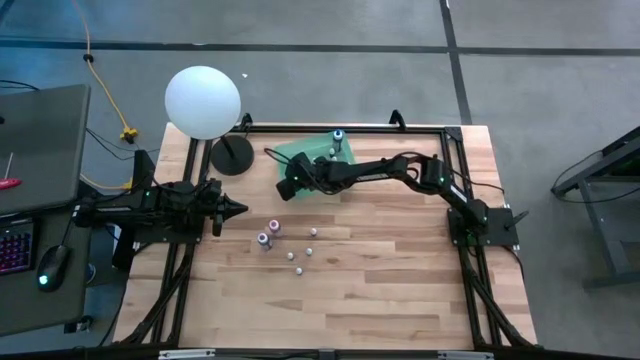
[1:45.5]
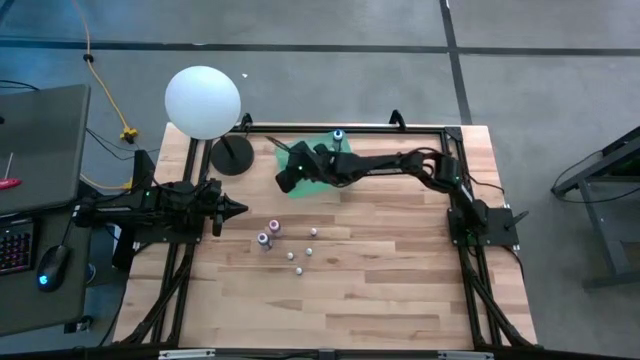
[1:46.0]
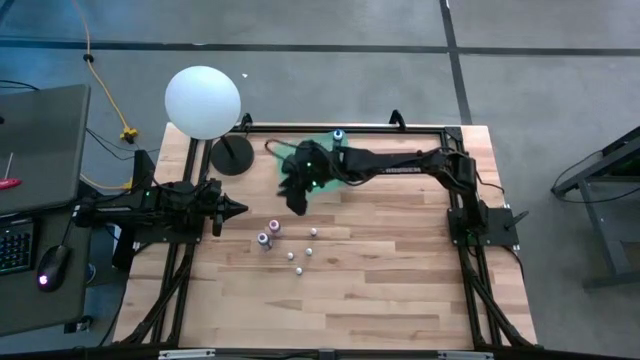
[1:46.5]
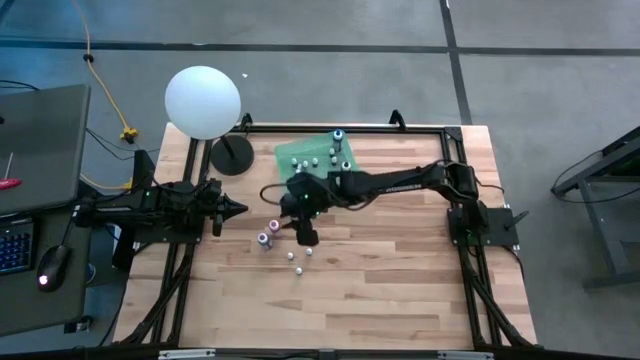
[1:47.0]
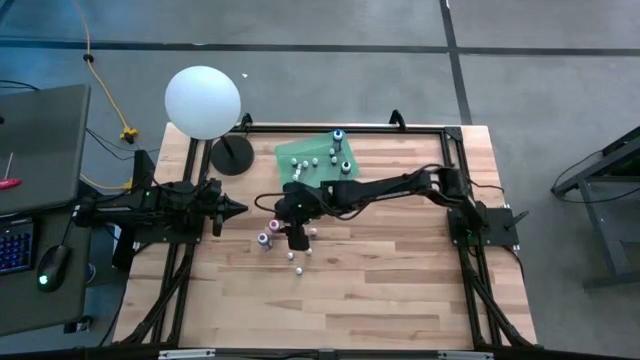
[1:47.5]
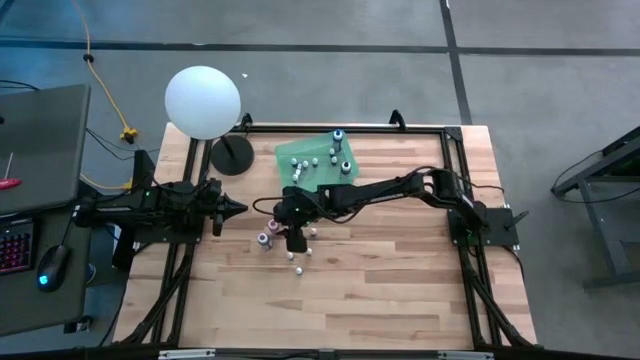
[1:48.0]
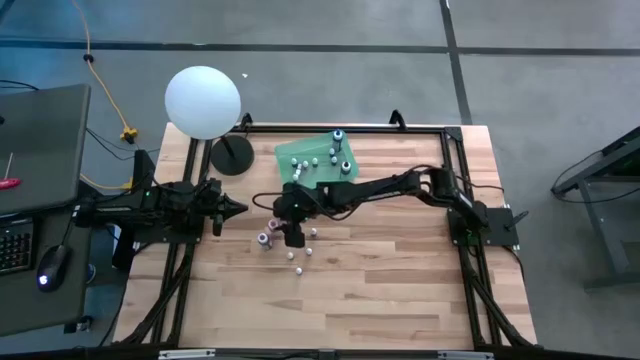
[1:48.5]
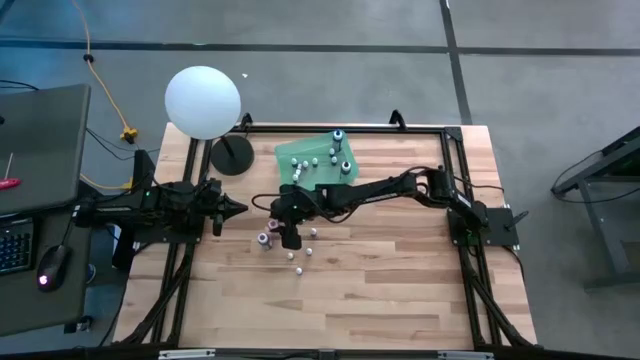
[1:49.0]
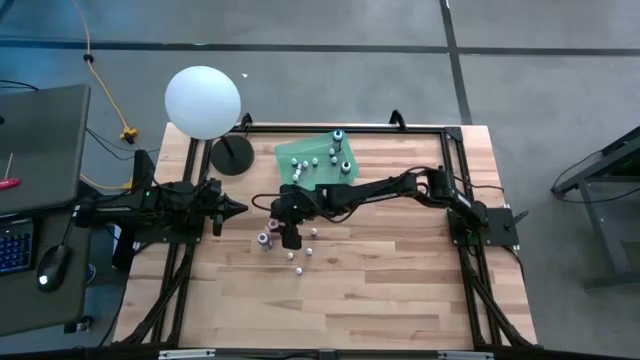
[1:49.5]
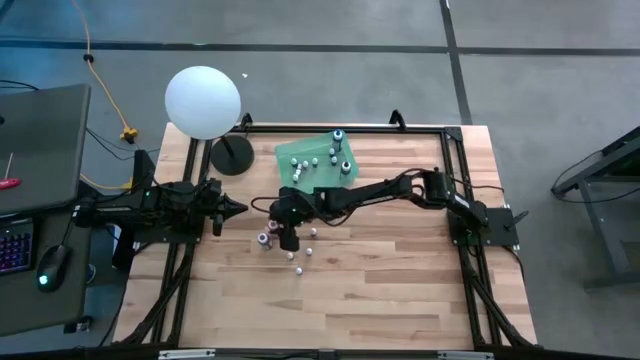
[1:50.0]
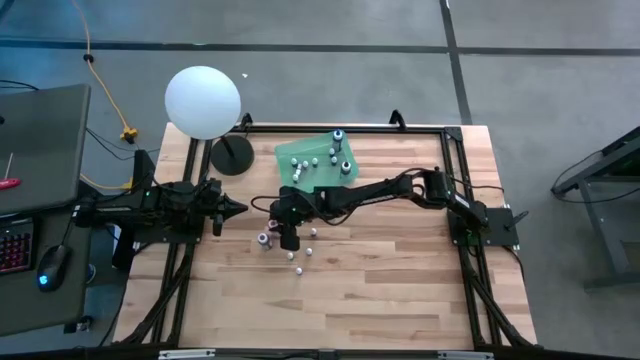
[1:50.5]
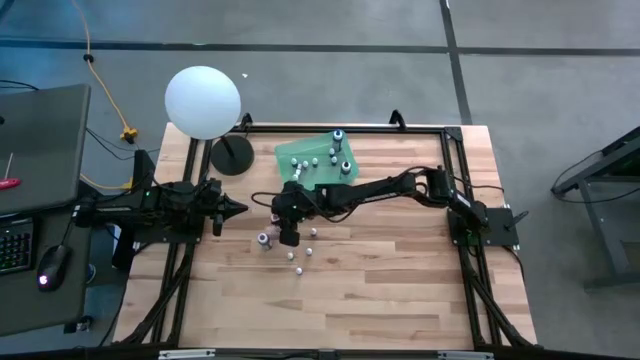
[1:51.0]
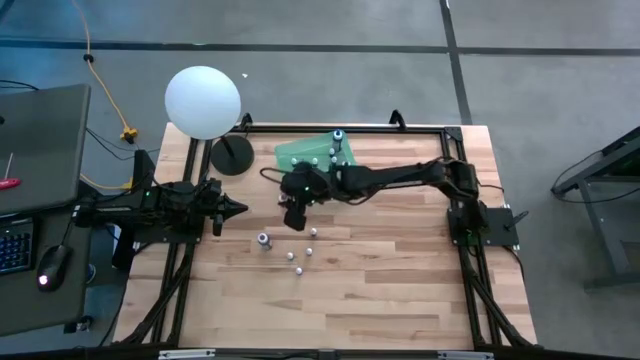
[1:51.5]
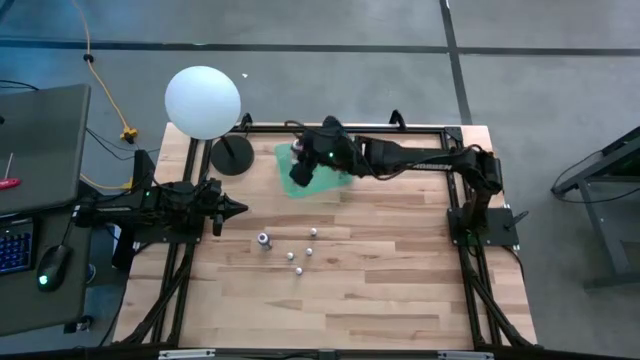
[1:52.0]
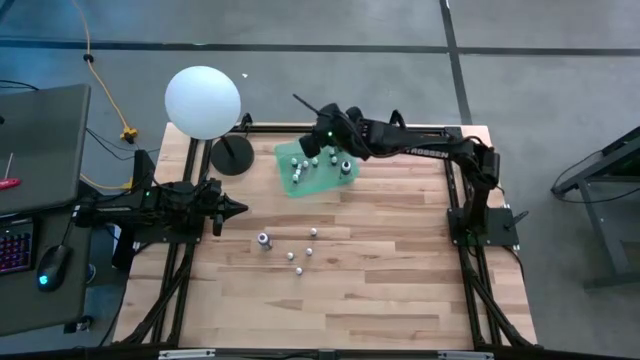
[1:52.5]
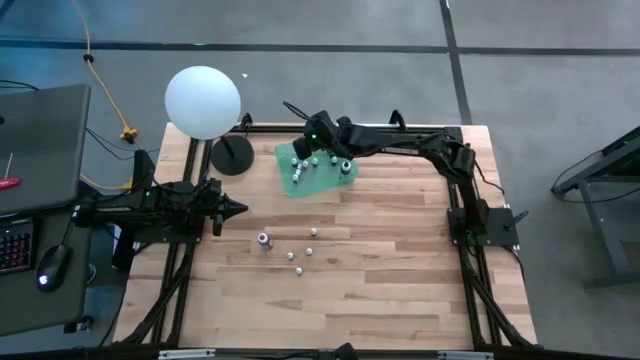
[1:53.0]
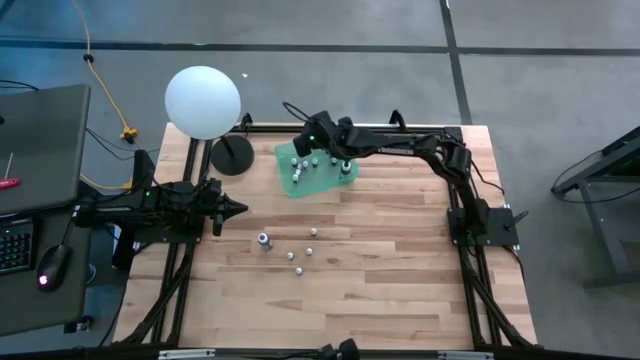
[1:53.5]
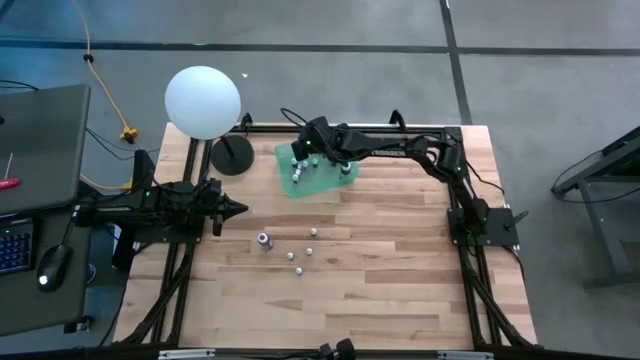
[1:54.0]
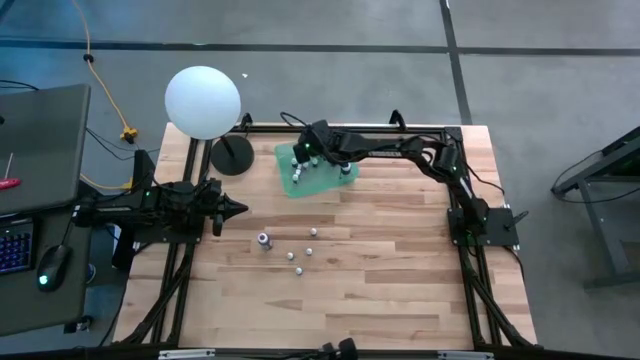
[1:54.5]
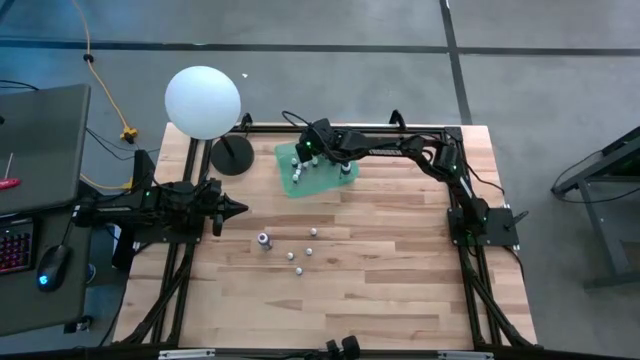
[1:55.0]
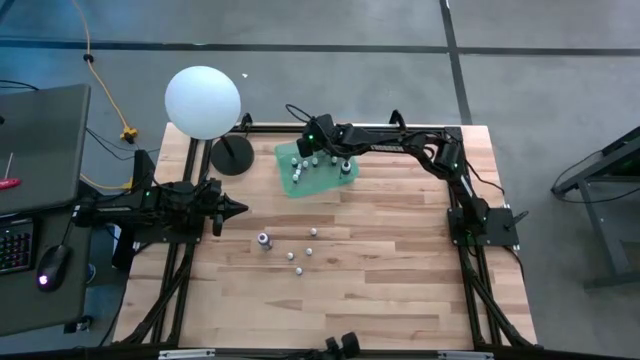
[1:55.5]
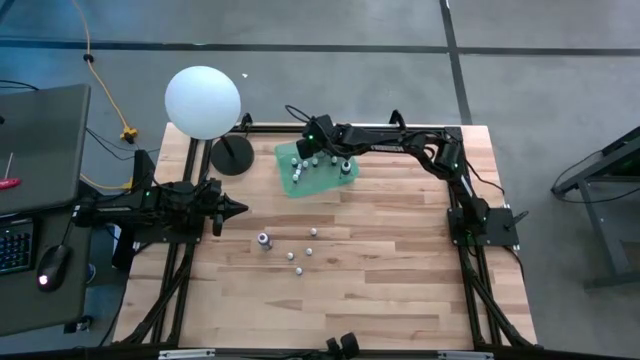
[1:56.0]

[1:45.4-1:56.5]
Task: Pick & Place food coloring
Put the large pink dye bottles in the green bin

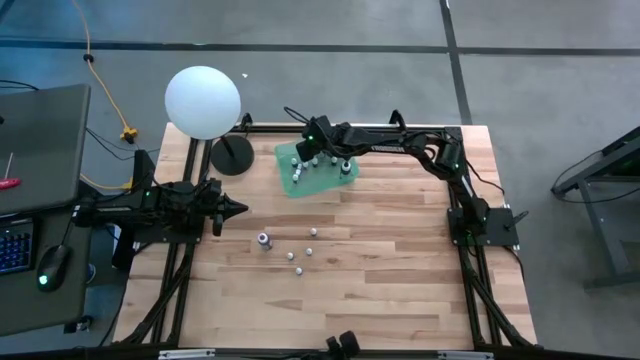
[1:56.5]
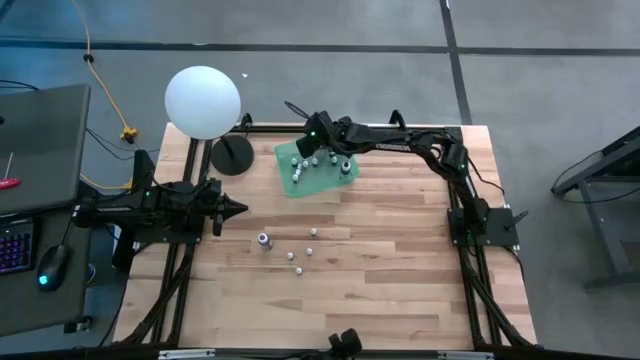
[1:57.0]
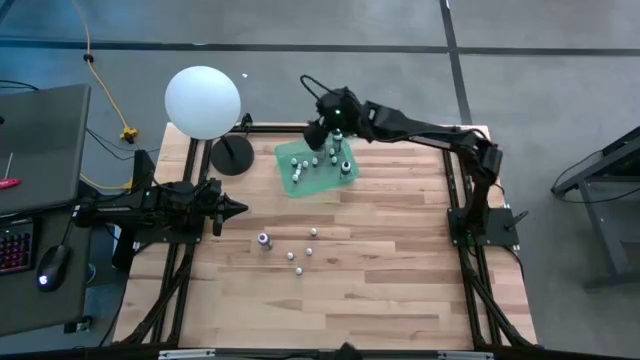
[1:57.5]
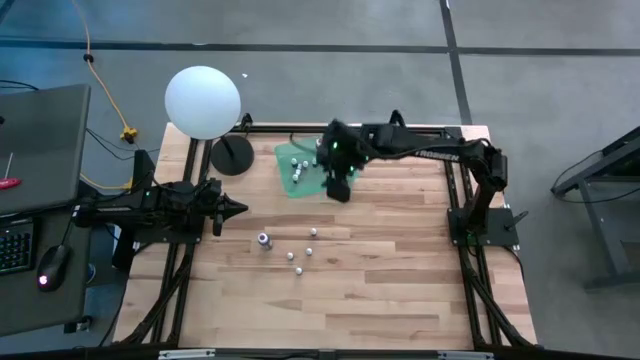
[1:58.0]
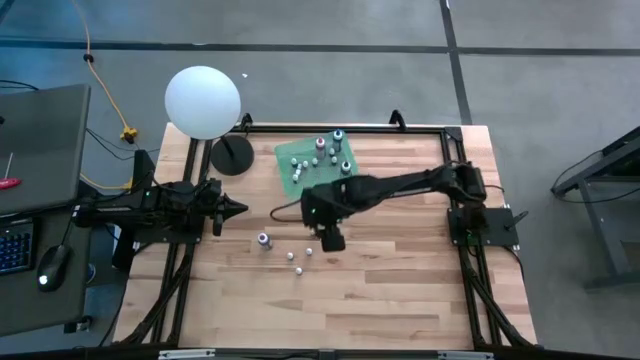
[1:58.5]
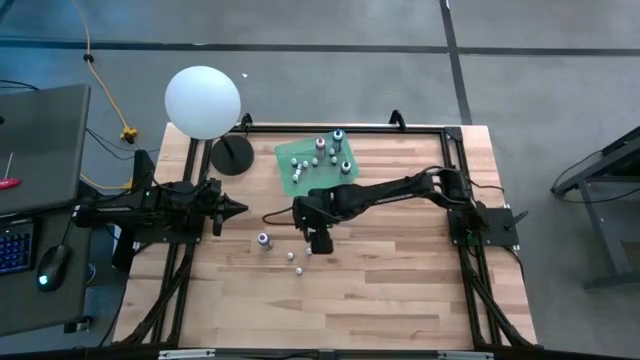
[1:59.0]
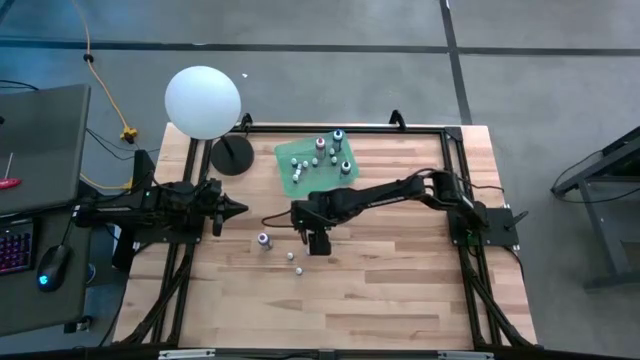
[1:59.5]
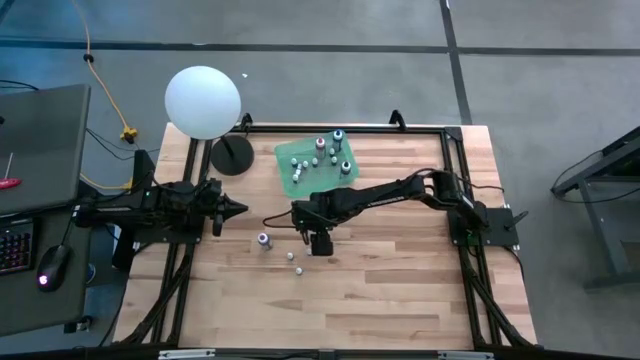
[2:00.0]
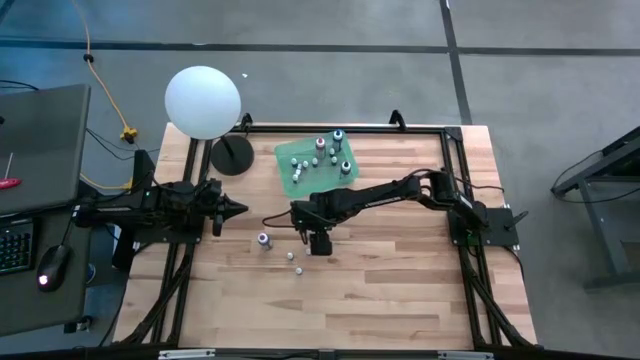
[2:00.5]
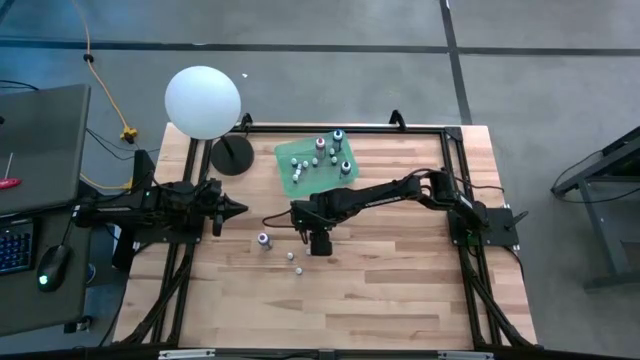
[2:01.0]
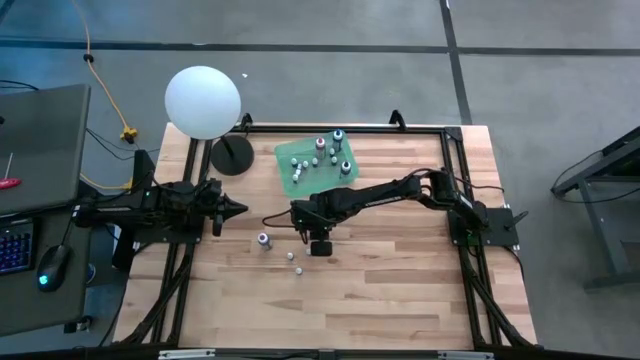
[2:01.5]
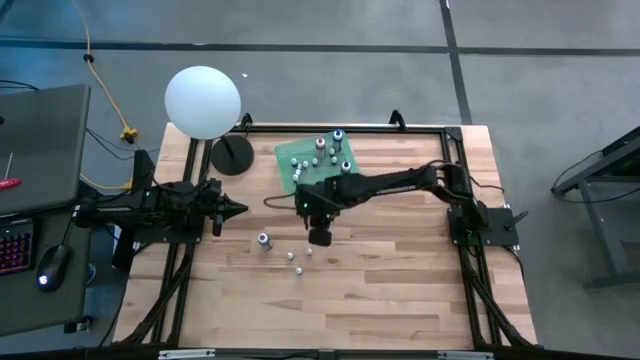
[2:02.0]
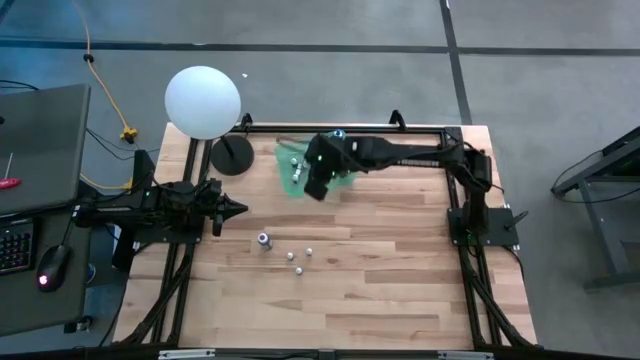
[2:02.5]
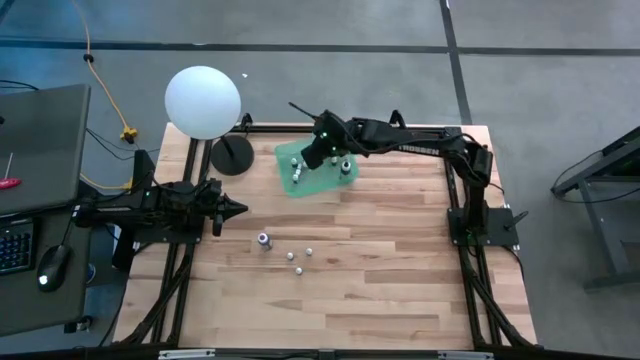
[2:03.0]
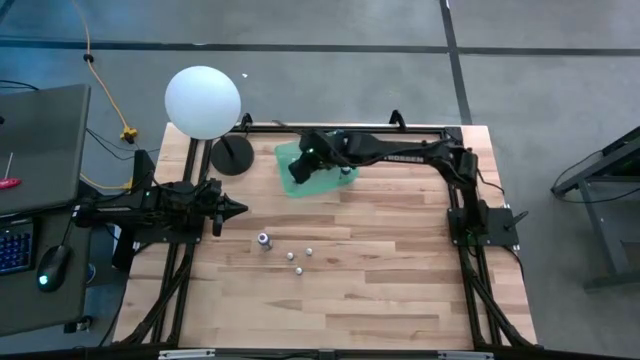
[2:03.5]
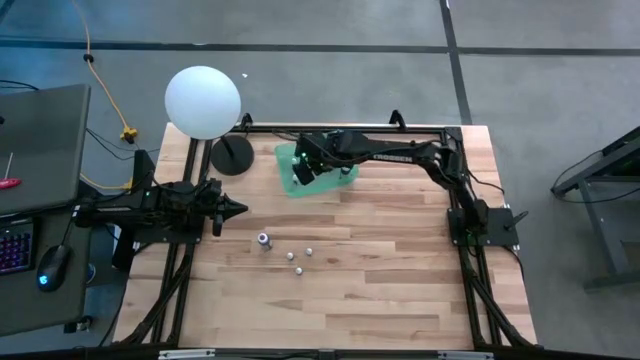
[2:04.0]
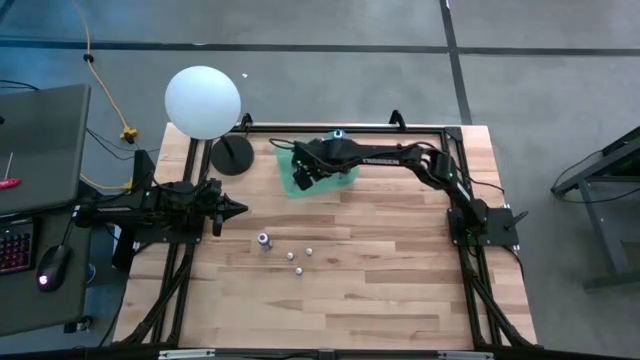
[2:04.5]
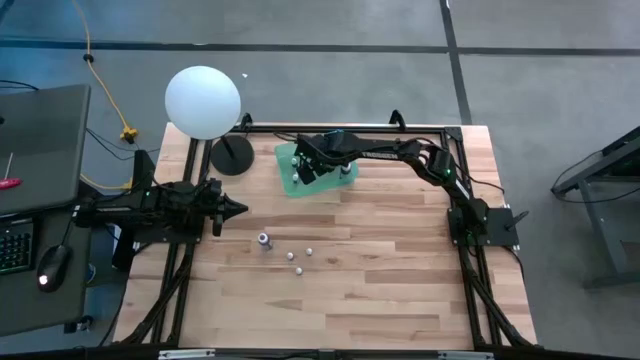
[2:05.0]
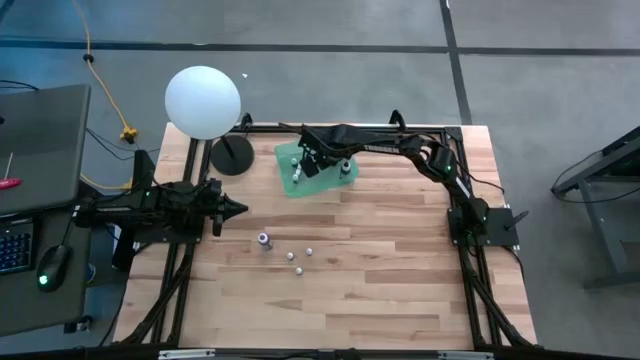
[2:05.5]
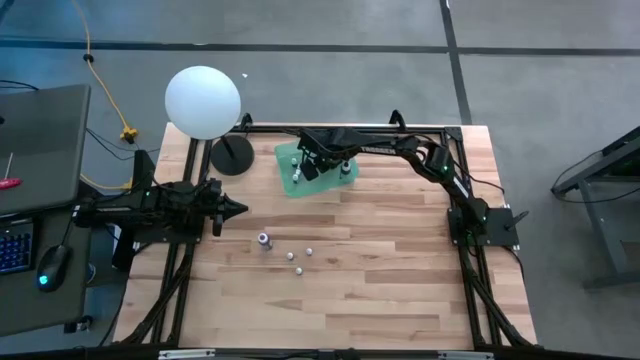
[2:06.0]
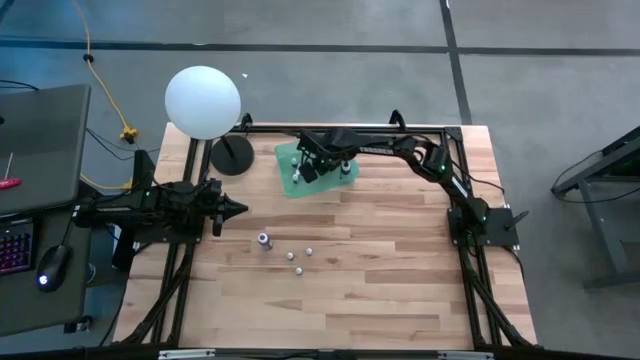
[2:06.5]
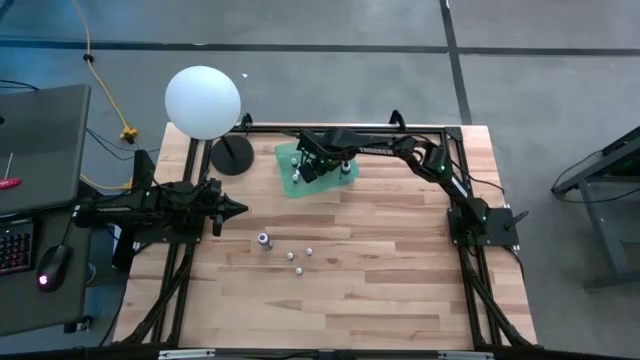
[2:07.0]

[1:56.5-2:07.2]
Put the small purple dye bottle in the green bin
